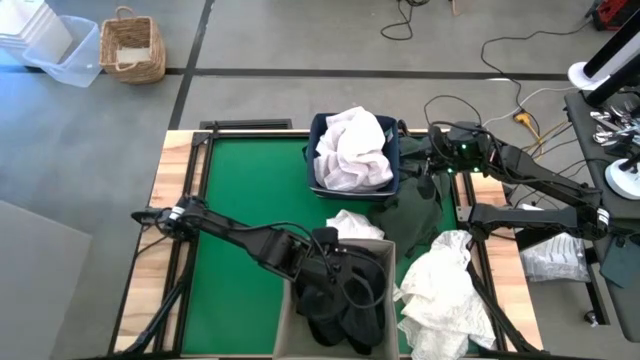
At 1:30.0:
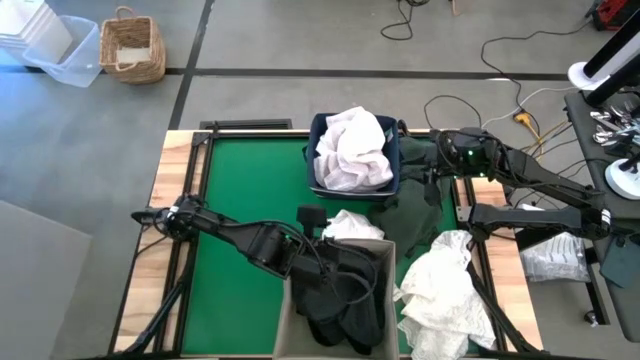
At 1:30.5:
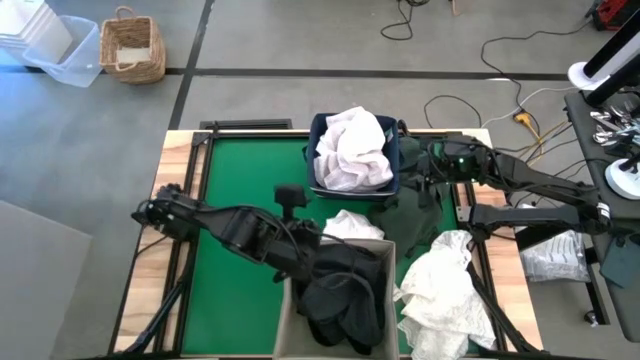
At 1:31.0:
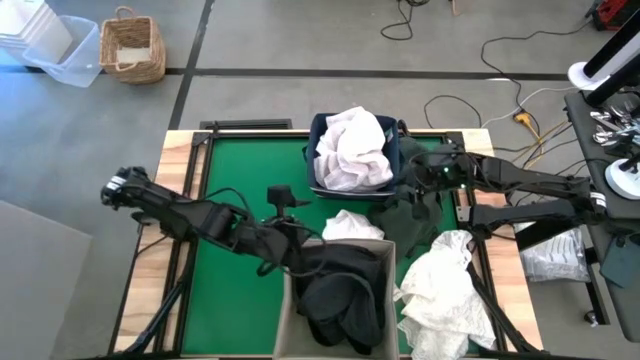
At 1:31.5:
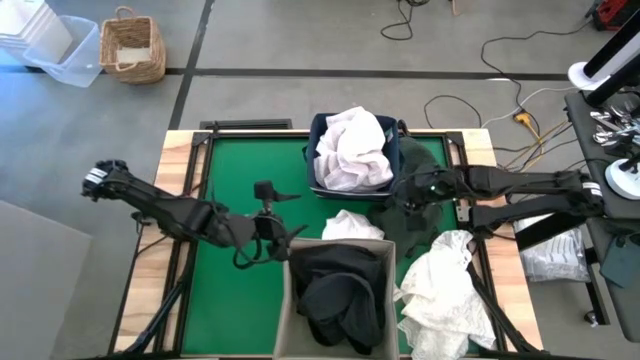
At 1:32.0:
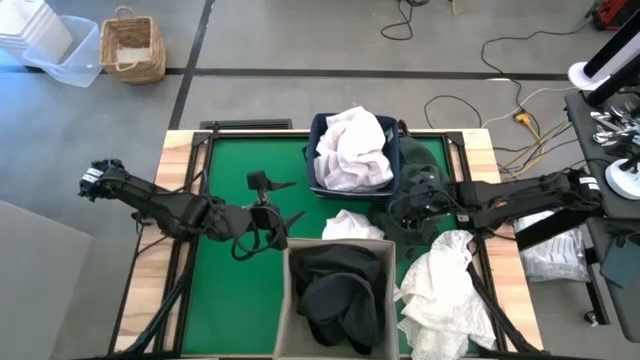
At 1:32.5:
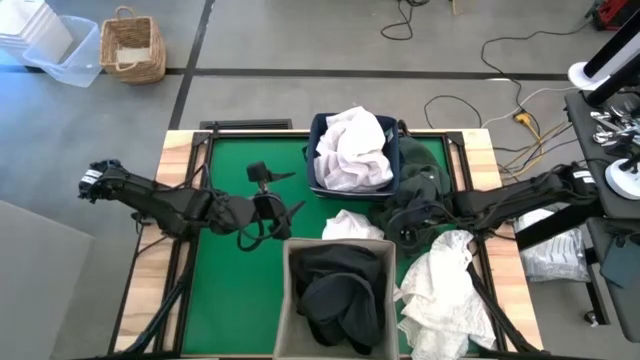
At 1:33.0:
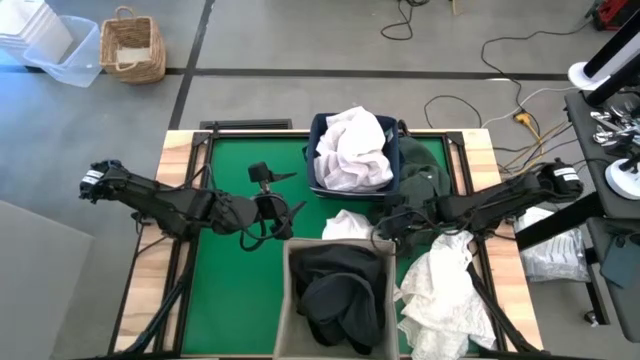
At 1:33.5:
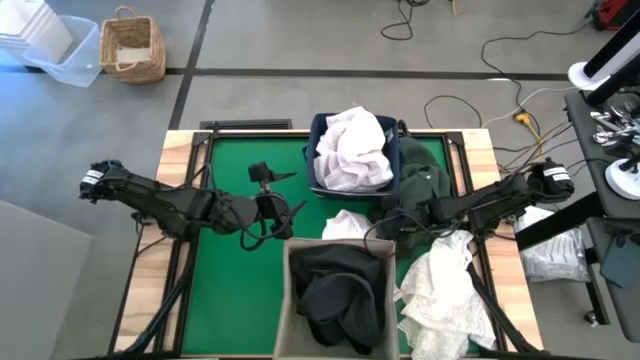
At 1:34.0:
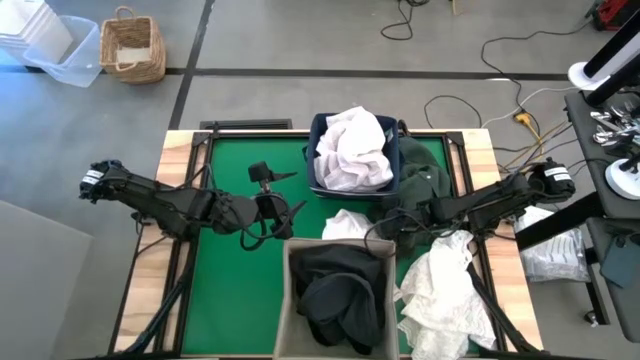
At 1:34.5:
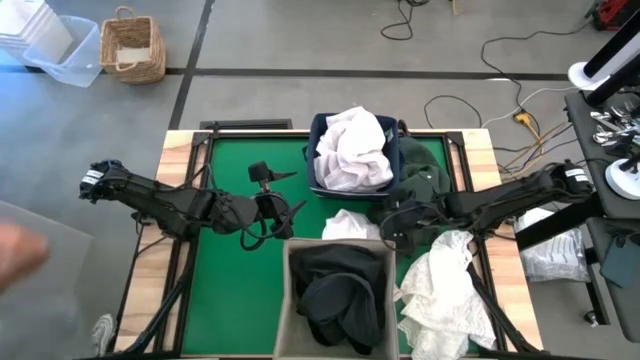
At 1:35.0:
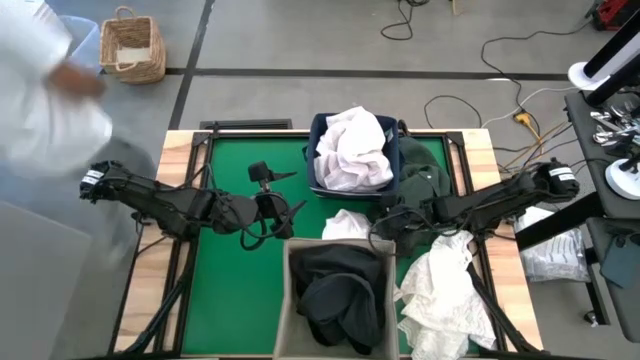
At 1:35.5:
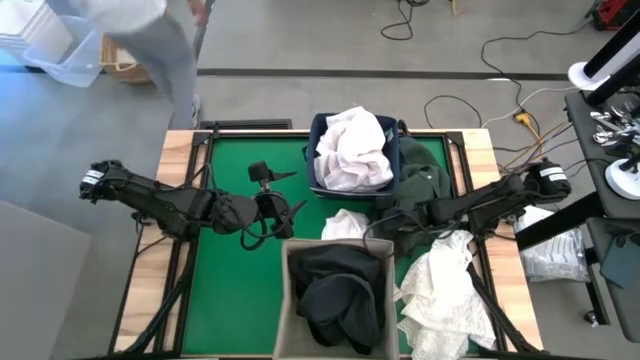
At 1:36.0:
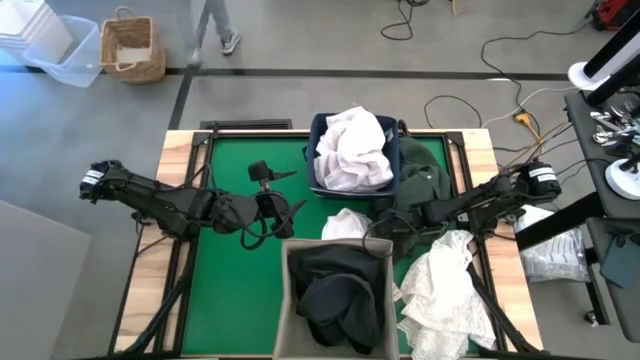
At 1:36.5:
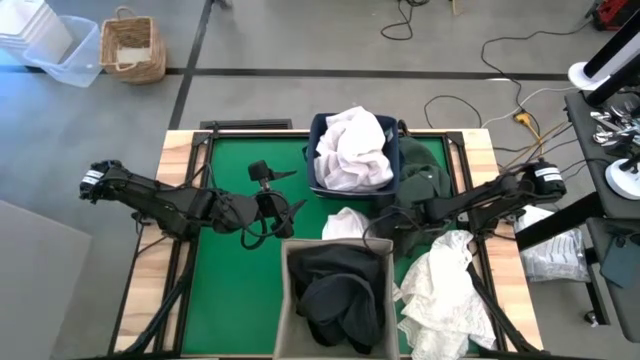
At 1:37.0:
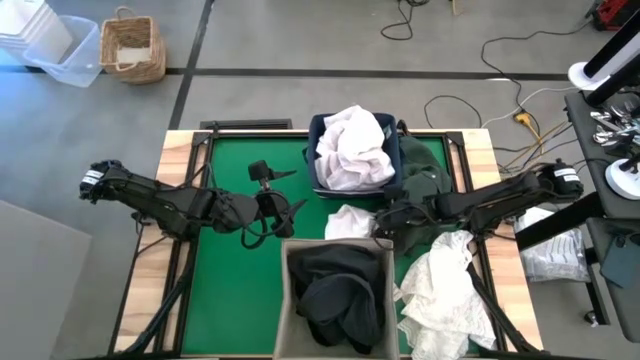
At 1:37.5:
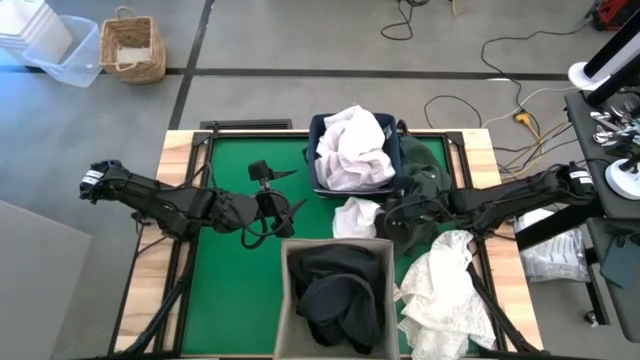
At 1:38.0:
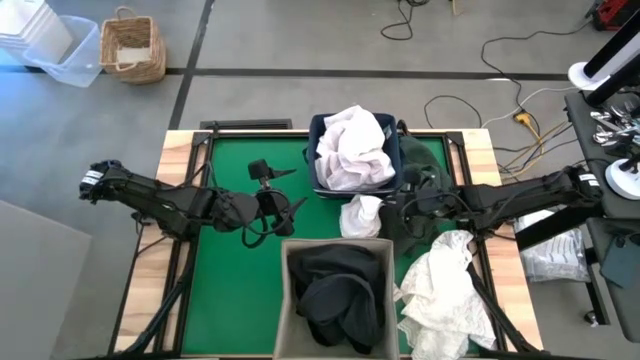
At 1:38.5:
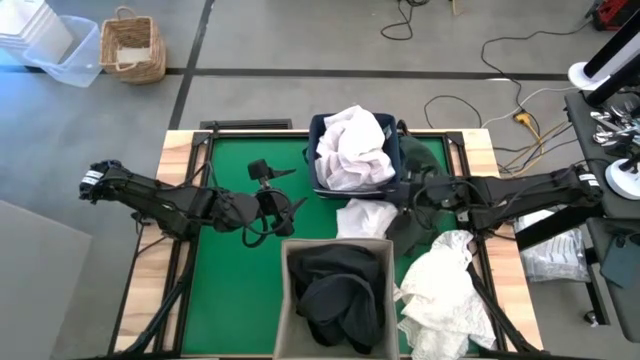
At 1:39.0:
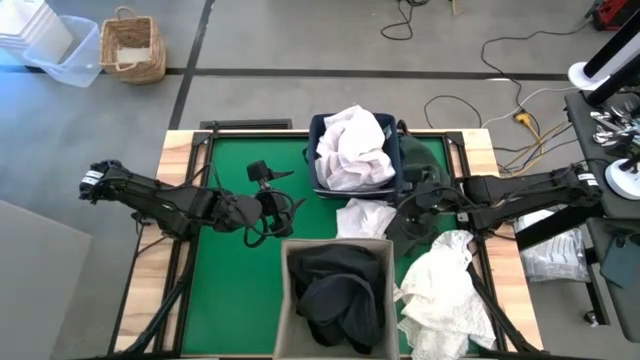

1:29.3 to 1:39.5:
Put the white boxer short into the blue laundry bin

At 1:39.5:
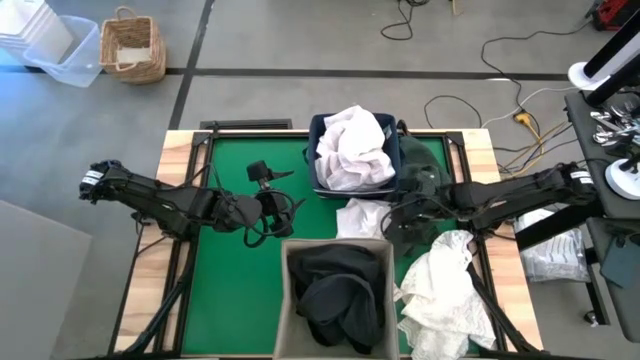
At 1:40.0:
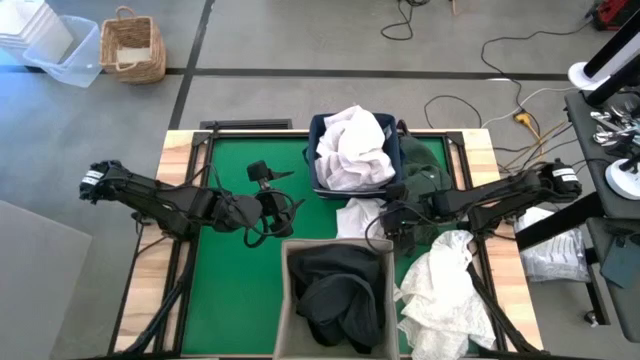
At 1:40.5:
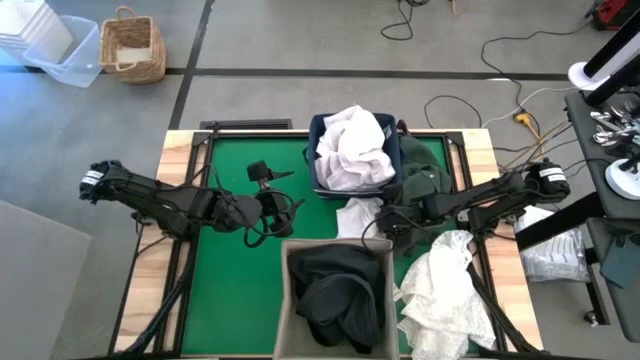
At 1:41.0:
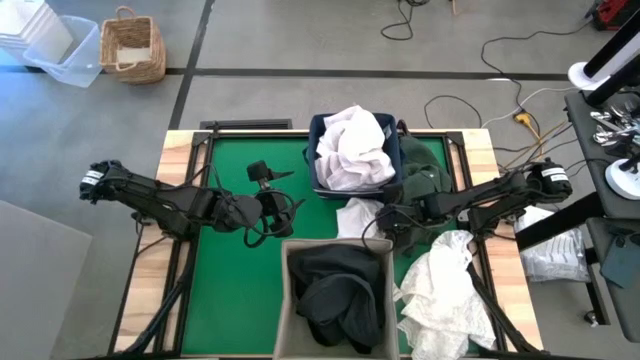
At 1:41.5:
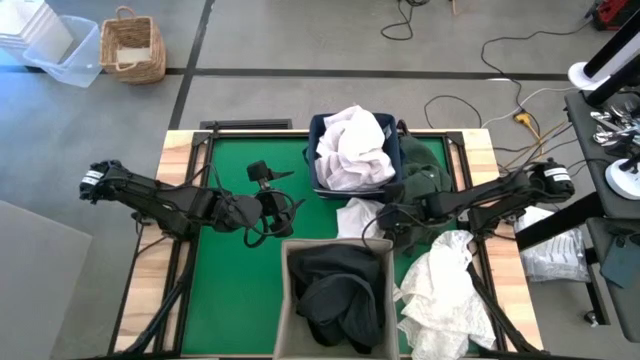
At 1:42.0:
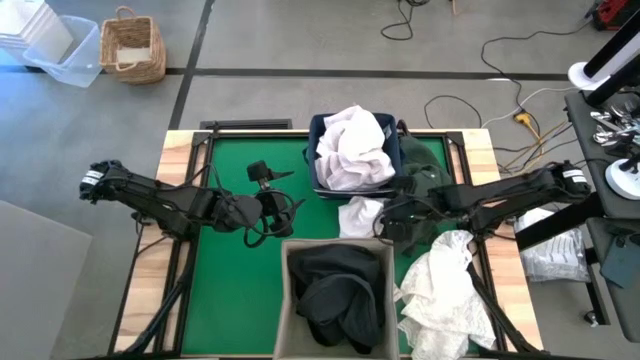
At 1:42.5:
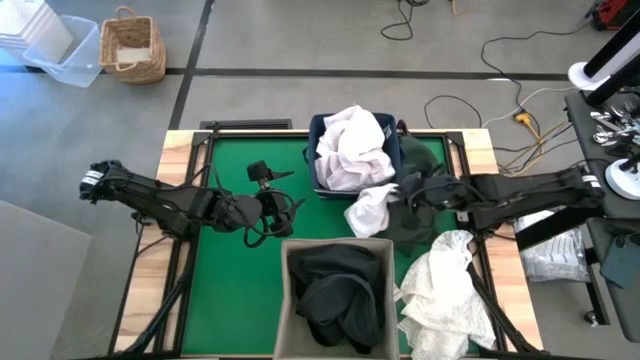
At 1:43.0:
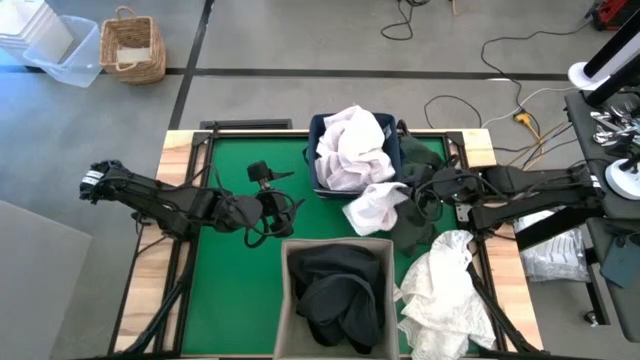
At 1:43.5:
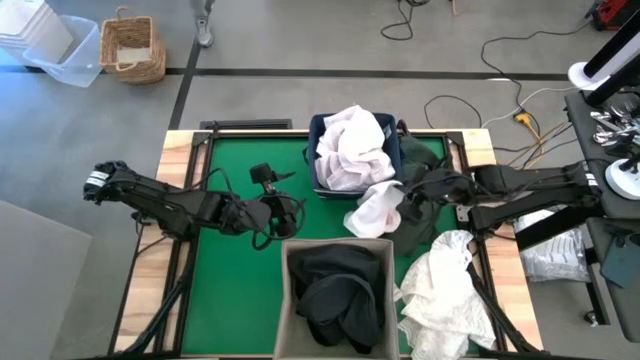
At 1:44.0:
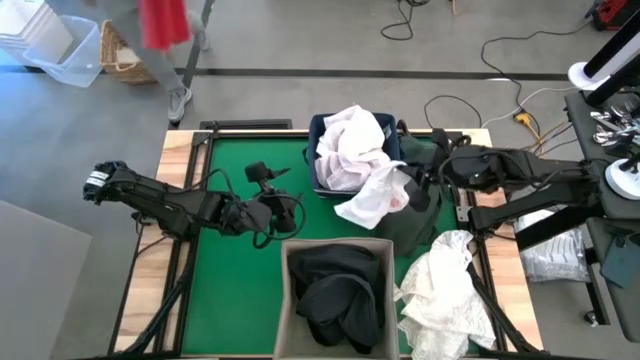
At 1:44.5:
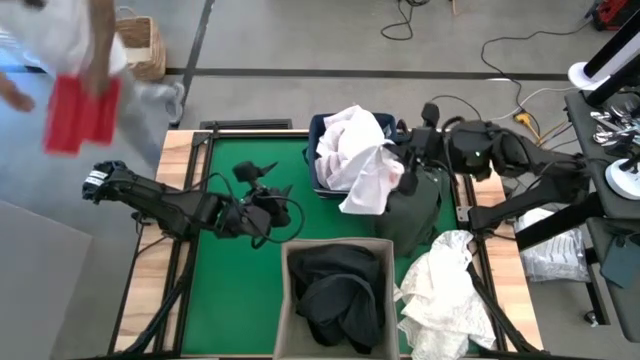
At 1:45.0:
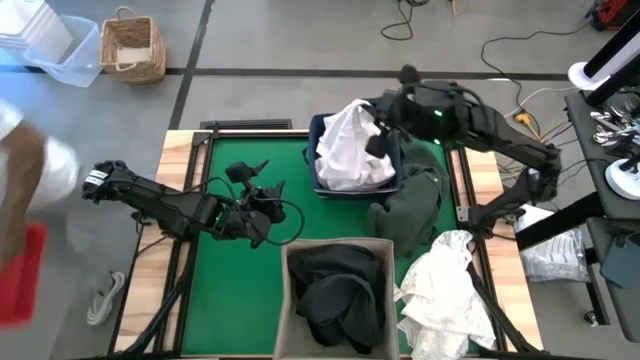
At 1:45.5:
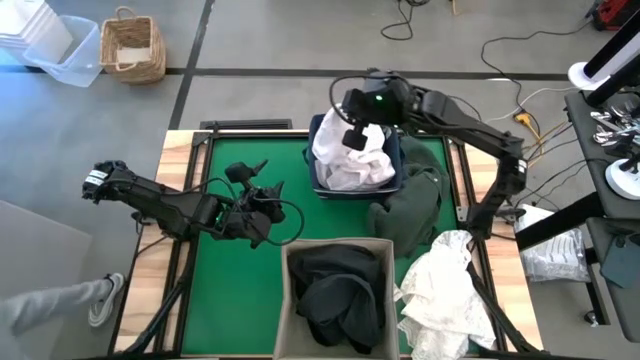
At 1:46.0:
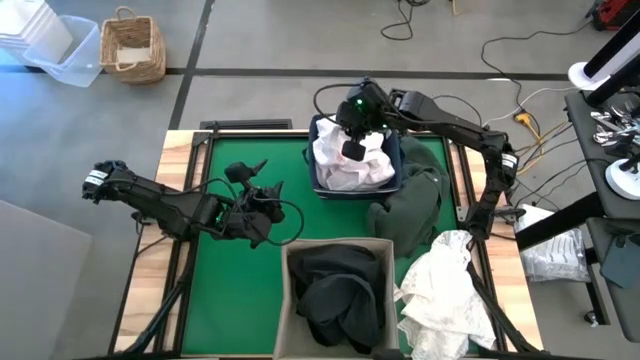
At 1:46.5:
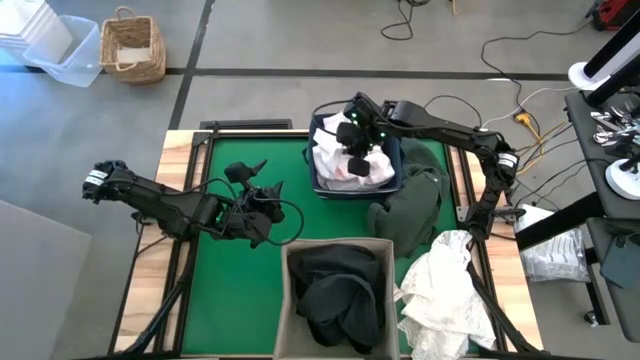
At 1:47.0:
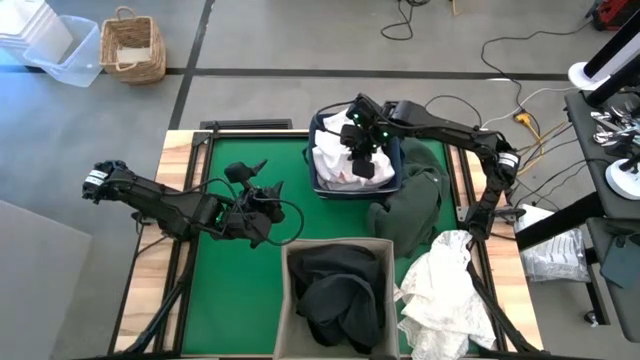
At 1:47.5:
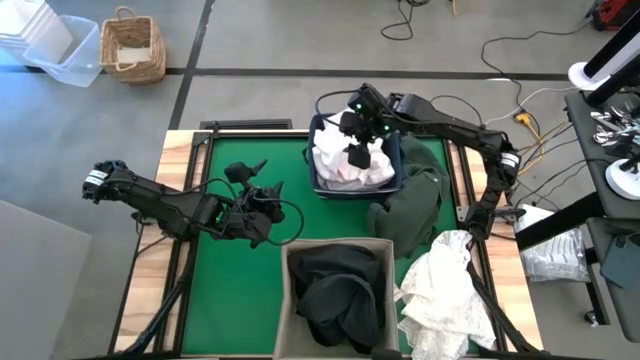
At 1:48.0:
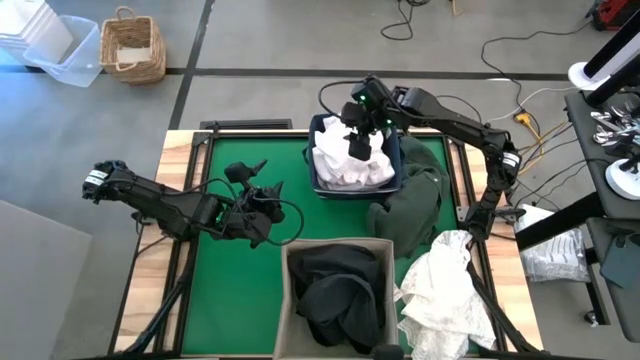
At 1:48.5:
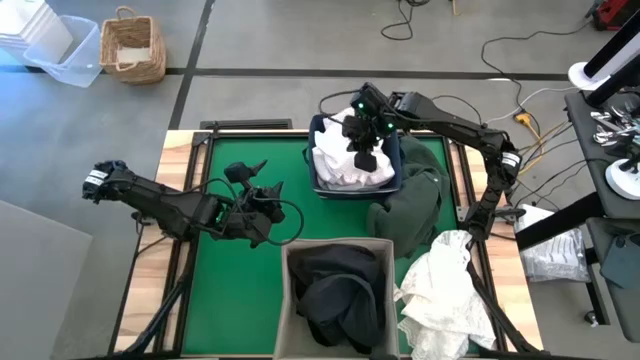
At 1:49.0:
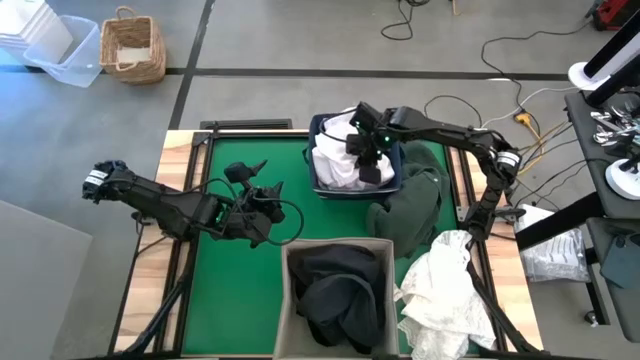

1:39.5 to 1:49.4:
Put the white boxer short into the blue laundry bin
